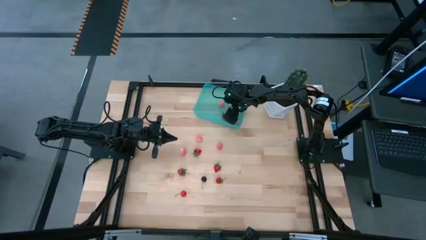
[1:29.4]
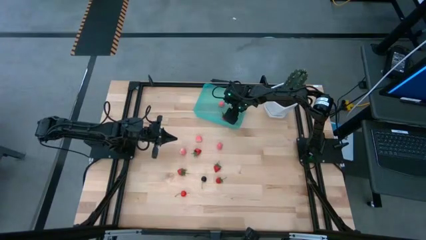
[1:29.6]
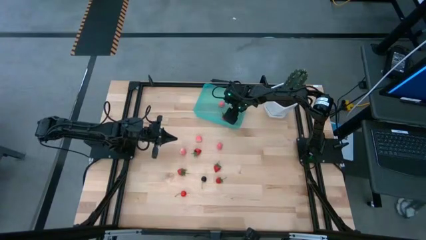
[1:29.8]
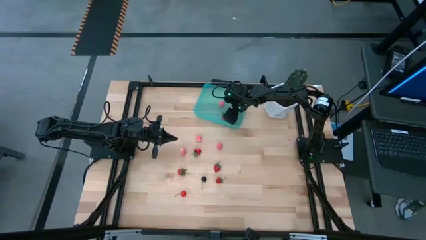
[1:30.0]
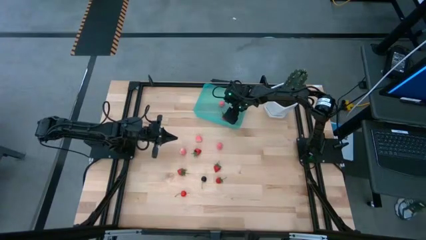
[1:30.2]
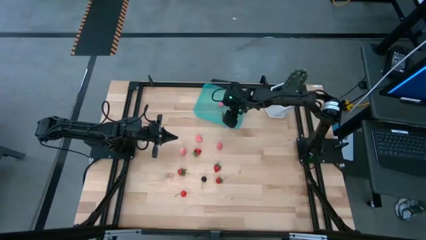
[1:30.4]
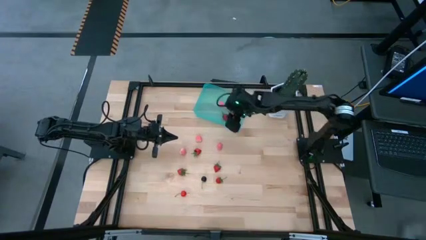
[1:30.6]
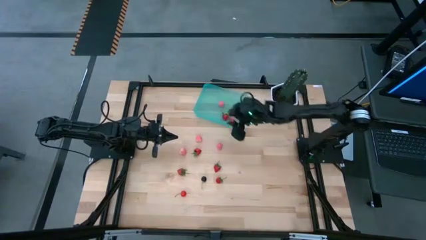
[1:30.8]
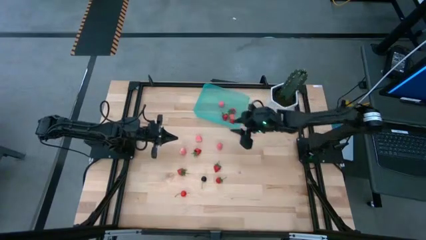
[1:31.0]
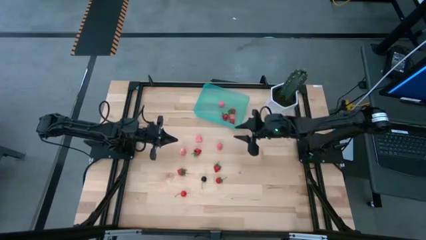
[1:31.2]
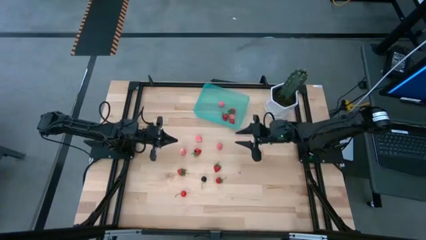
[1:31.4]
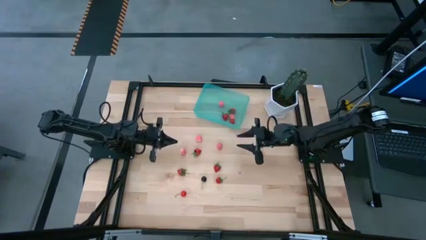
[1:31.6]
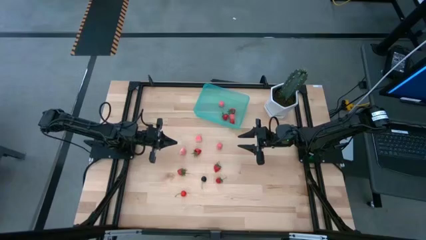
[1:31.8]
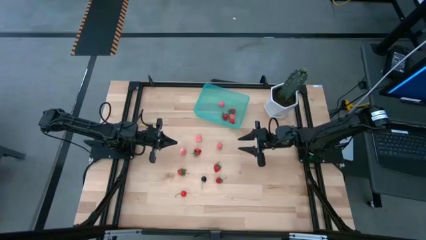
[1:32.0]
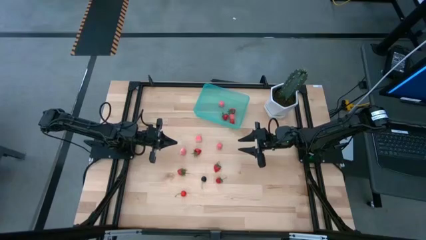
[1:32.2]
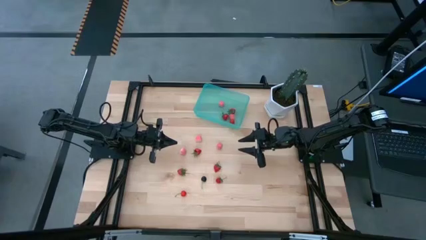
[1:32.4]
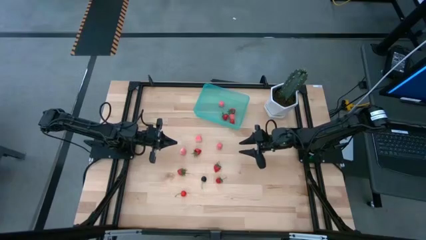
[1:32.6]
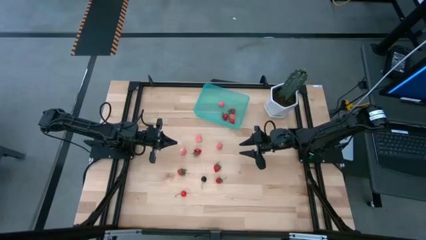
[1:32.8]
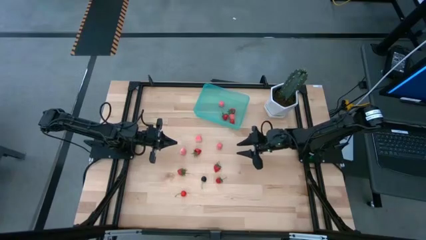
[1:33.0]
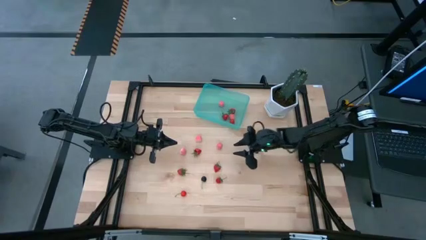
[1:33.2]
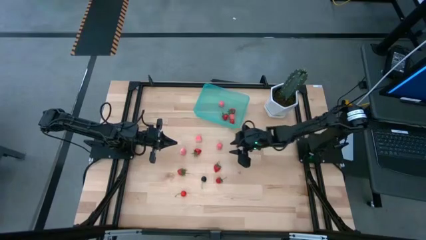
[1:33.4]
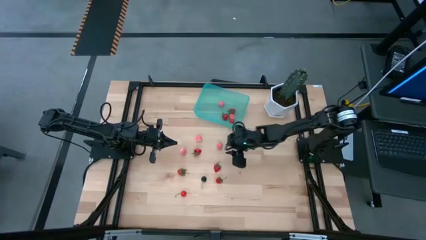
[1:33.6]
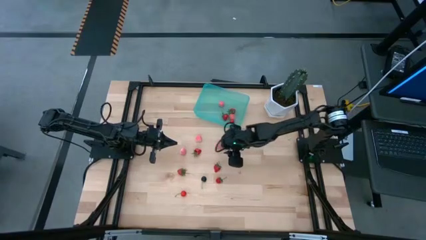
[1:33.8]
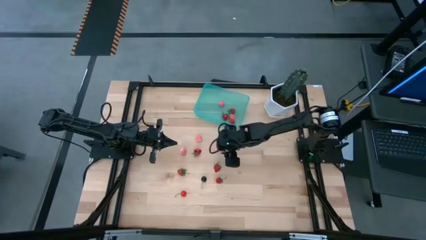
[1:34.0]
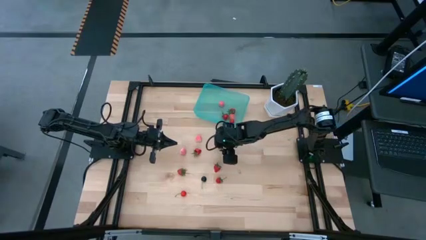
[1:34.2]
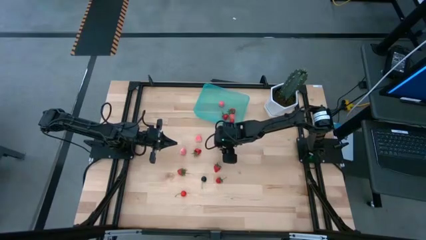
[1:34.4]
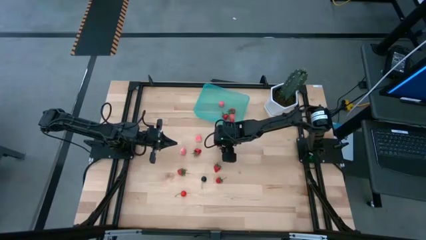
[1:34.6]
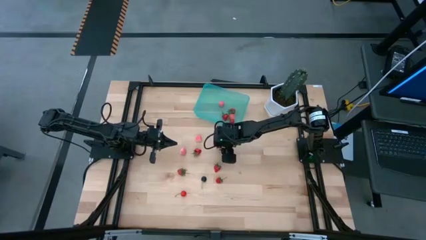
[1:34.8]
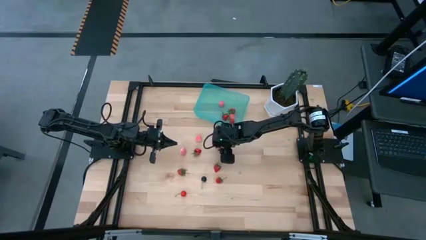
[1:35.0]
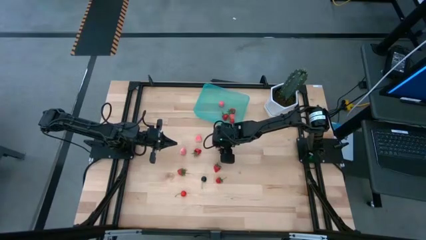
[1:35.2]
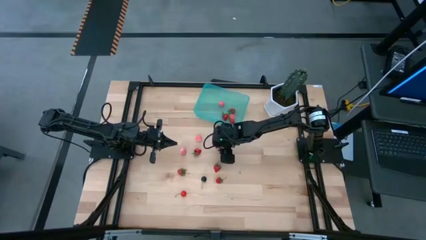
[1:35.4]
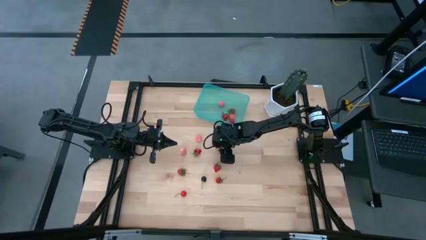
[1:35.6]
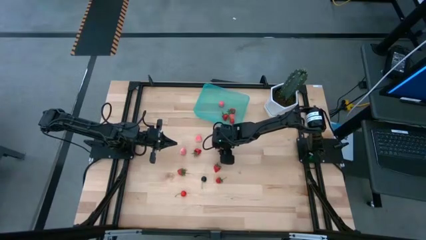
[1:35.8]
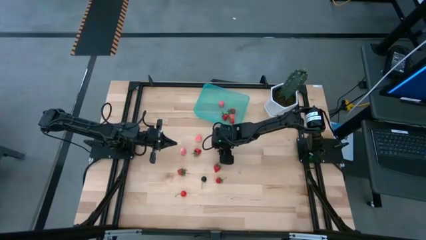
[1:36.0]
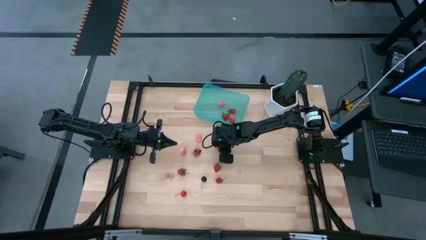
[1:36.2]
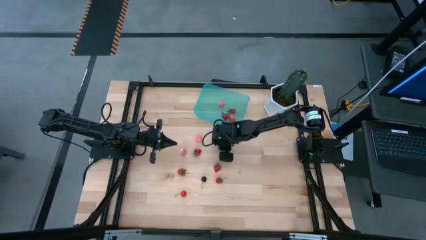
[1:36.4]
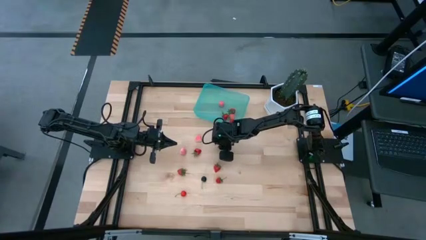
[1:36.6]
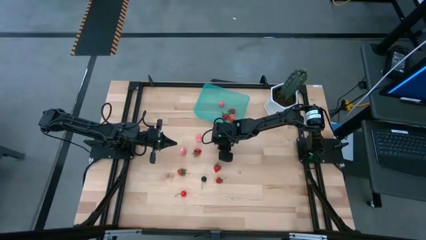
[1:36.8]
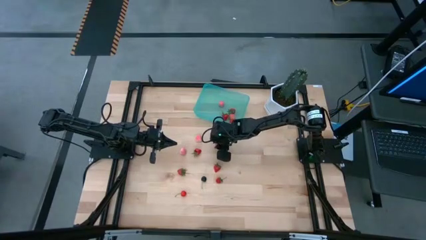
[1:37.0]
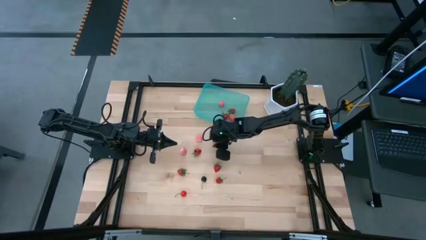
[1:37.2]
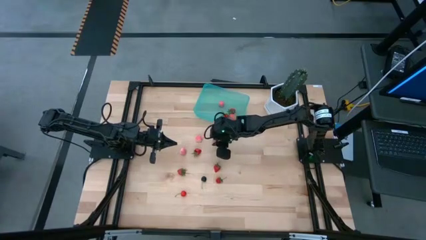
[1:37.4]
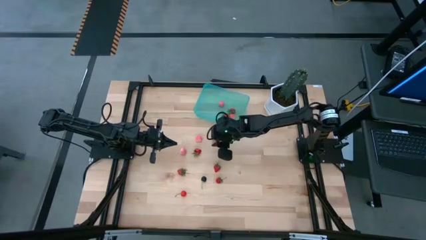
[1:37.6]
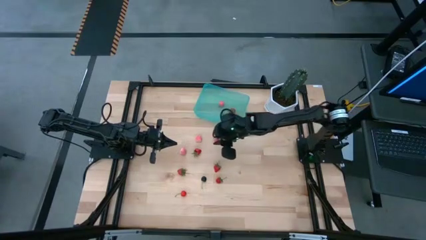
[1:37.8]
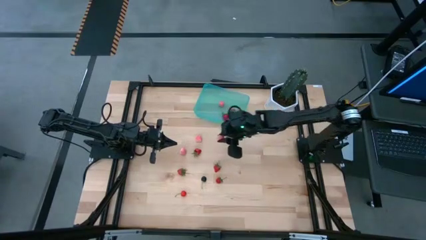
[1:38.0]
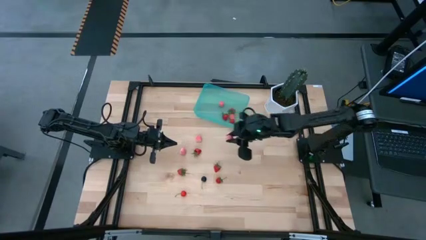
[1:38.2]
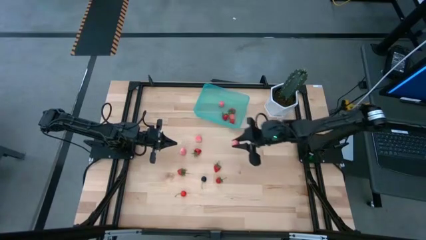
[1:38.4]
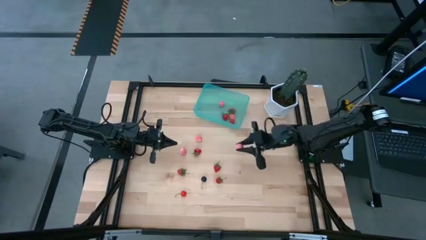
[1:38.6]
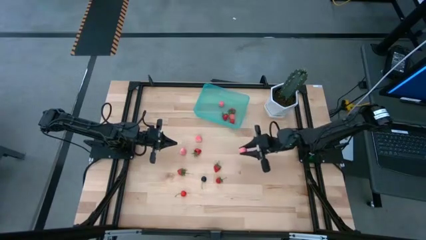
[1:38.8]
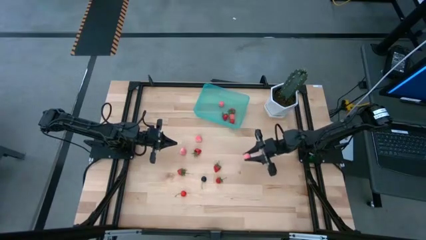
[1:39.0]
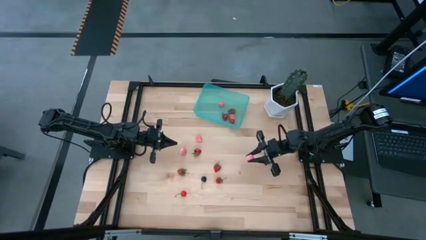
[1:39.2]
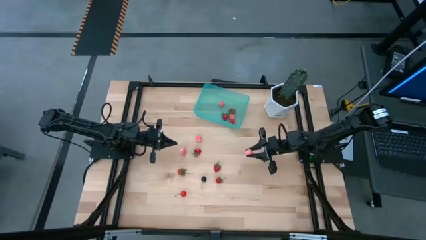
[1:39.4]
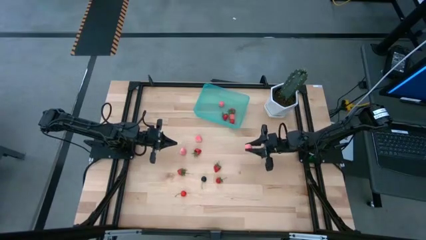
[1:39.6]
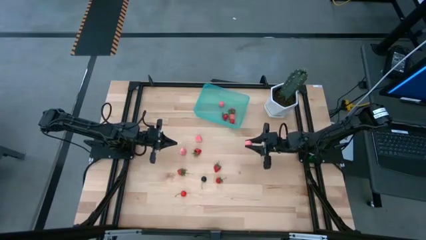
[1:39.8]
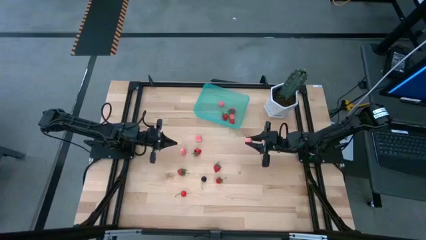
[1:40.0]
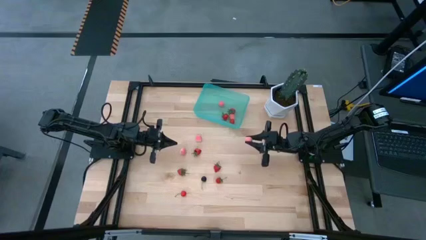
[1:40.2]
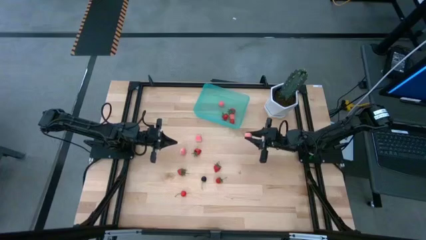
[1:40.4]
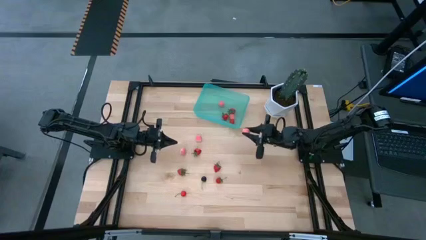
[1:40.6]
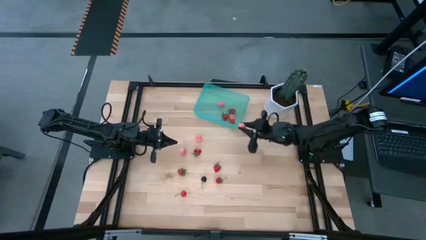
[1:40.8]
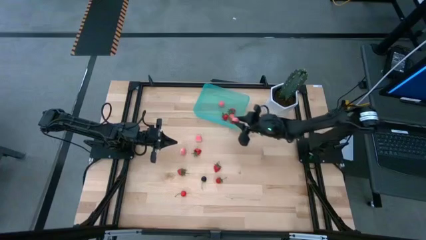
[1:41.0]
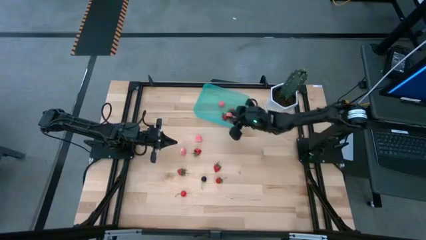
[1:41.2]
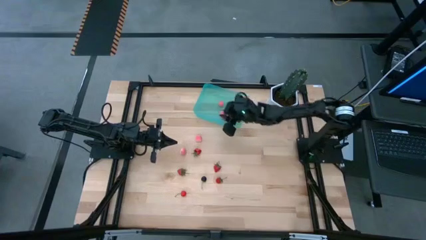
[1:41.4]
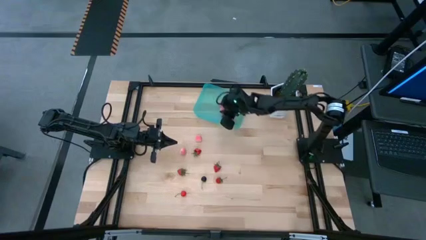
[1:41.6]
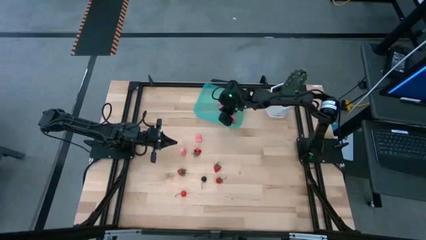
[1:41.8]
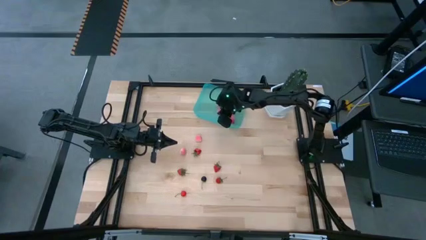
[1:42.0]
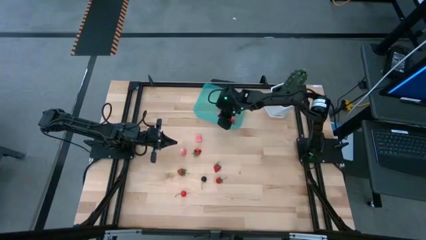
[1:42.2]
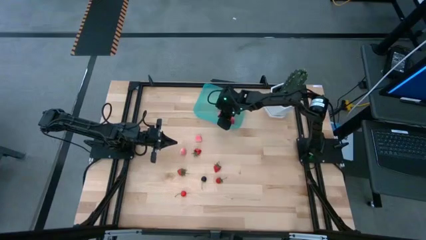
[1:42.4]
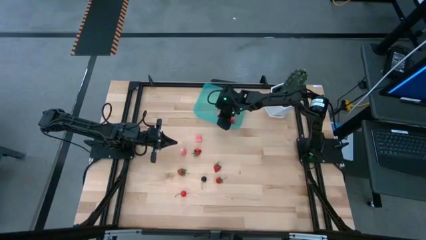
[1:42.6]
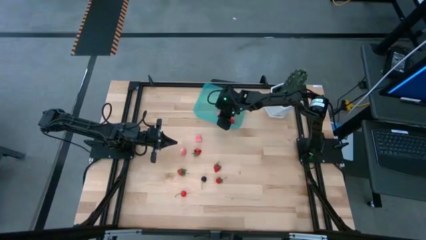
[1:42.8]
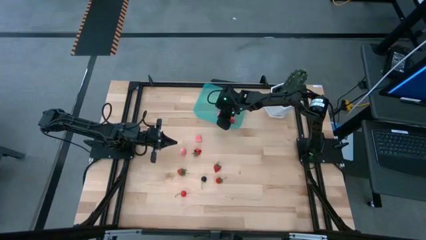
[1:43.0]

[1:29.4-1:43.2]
Task: Pick and placing Produce into tupperware
Put the pink peach into the light blue bin

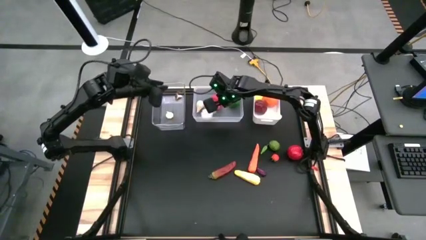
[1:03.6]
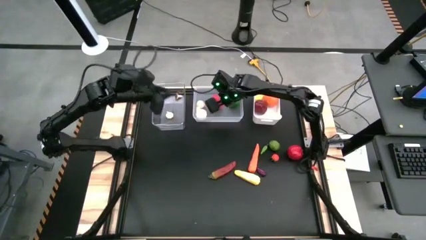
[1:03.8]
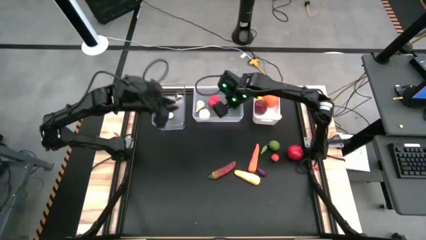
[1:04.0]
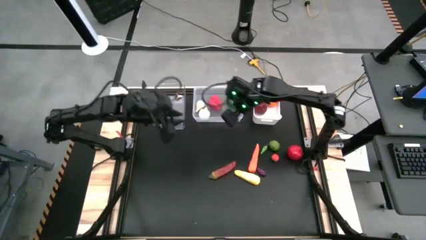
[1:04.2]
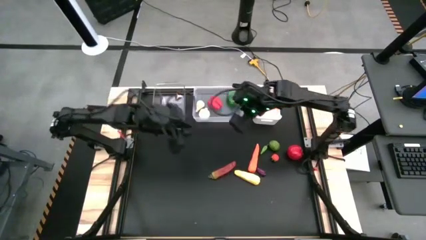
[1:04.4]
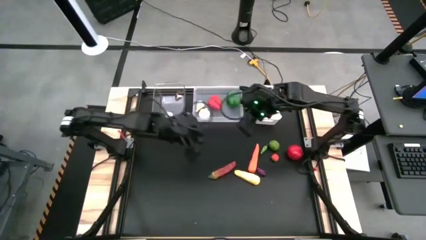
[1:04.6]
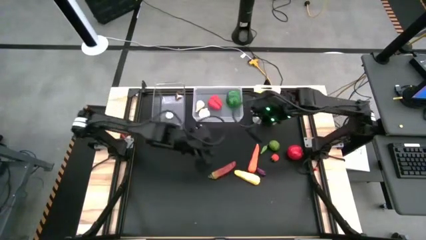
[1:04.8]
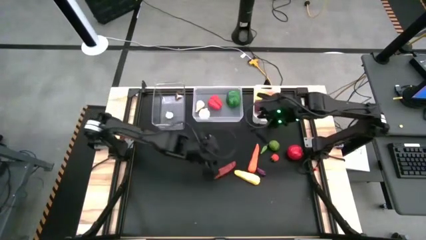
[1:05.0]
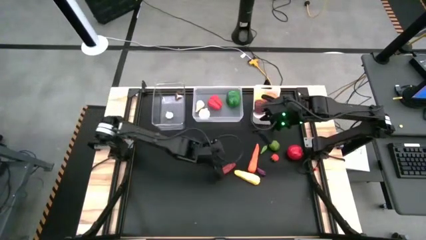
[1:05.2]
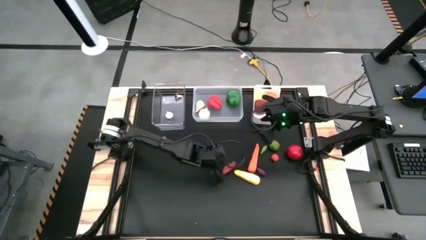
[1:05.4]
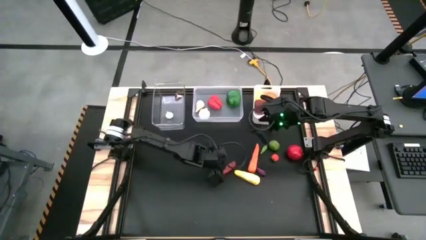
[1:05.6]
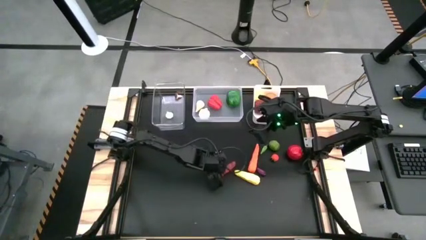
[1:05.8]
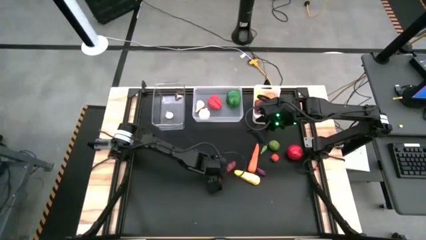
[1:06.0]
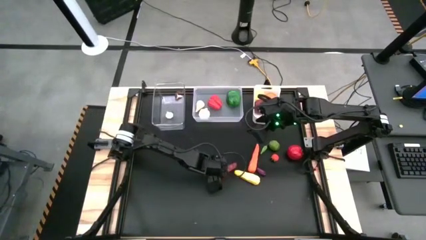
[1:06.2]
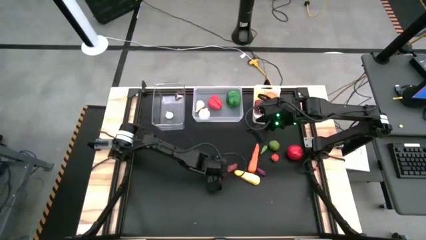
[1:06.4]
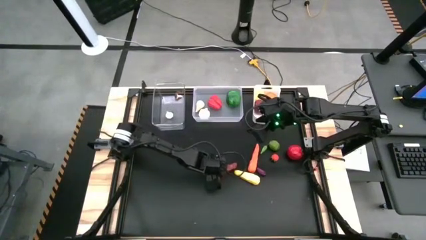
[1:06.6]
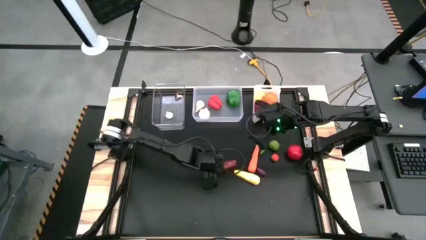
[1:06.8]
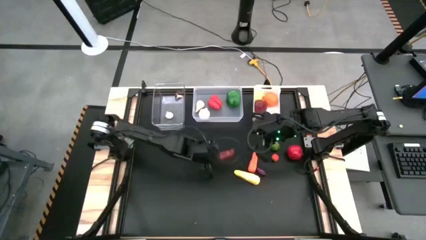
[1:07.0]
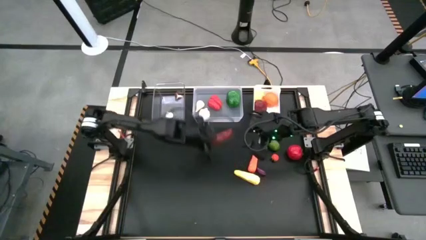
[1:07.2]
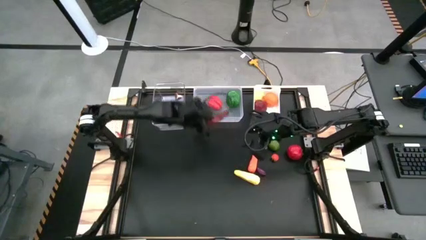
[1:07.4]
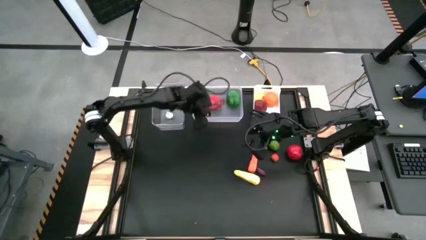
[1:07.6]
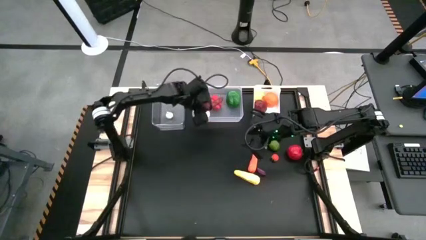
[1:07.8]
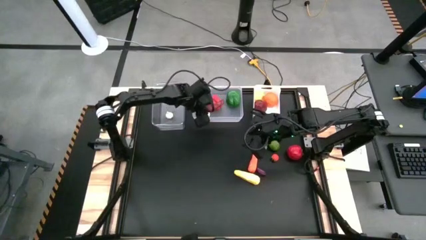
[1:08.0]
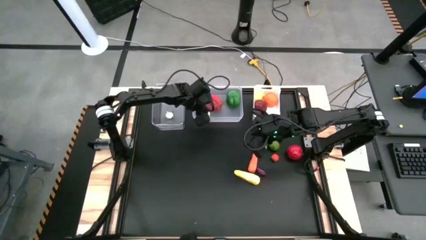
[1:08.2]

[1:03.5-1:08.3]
Task: Sort produce into baskets
Put the red chili pepper into the transparent bin
